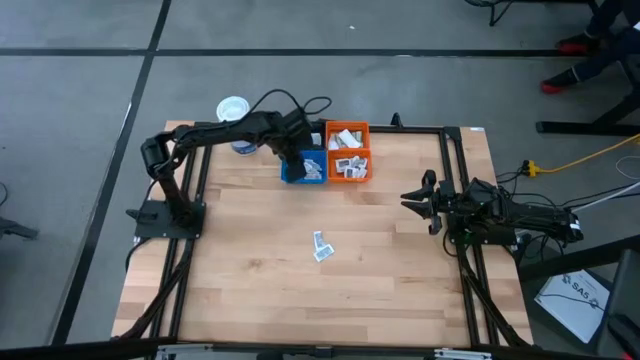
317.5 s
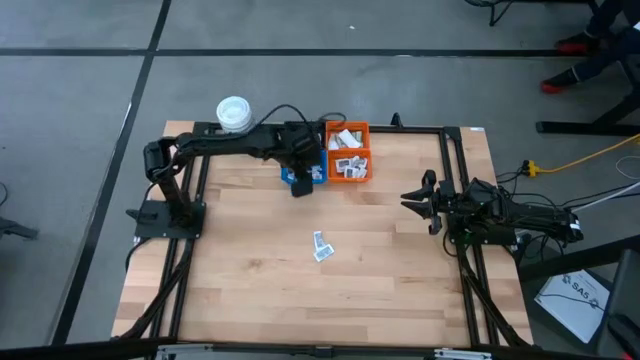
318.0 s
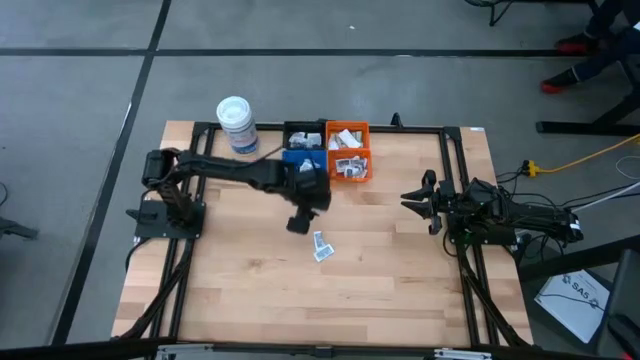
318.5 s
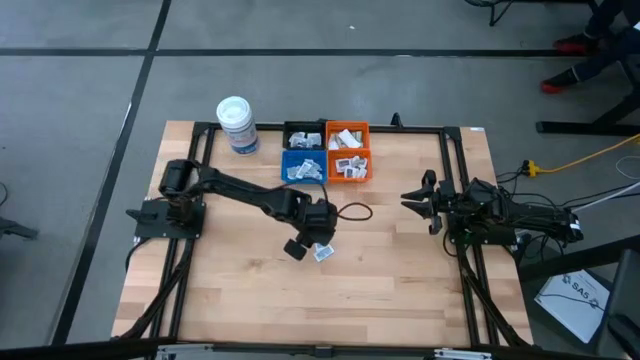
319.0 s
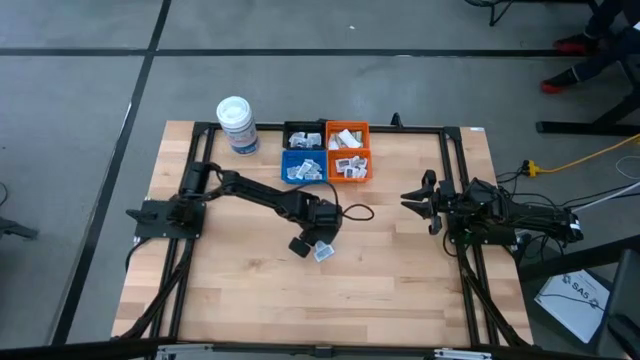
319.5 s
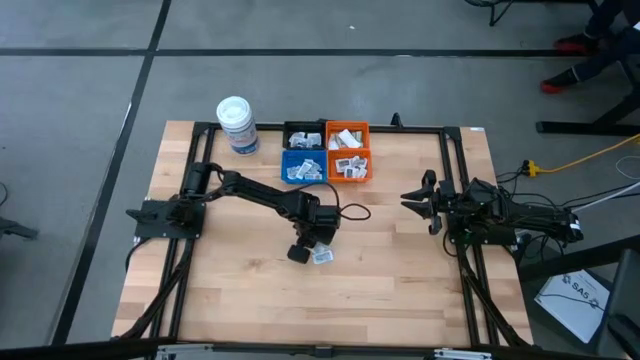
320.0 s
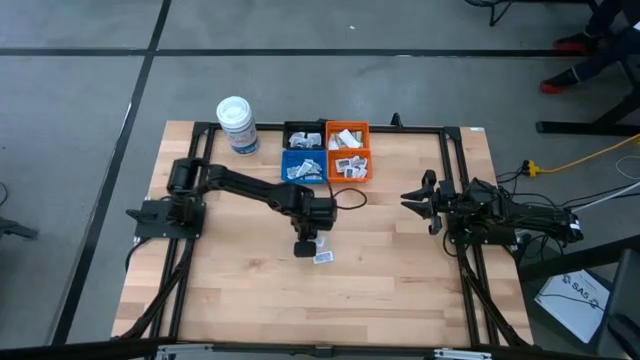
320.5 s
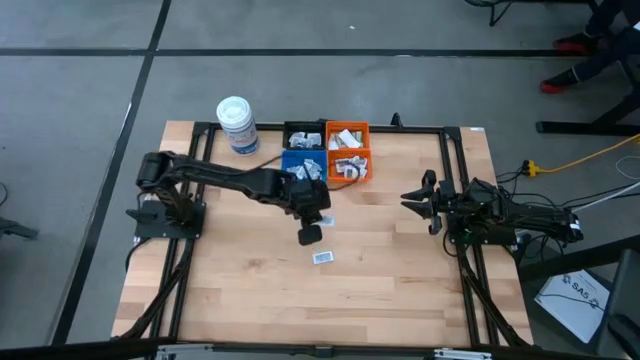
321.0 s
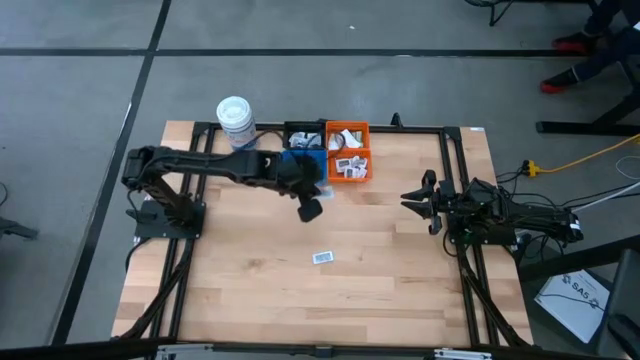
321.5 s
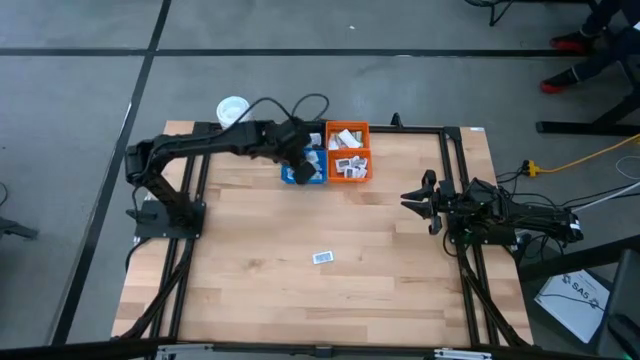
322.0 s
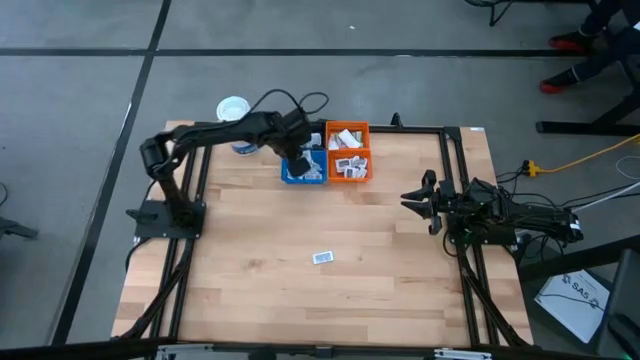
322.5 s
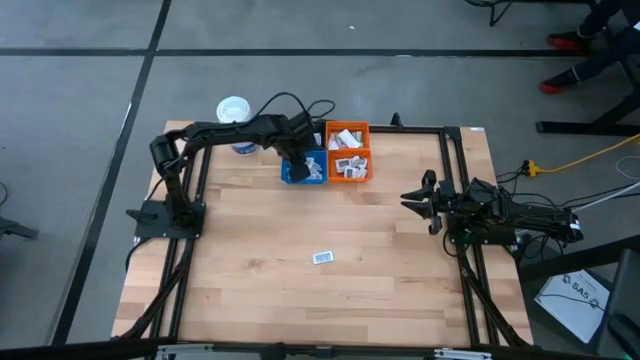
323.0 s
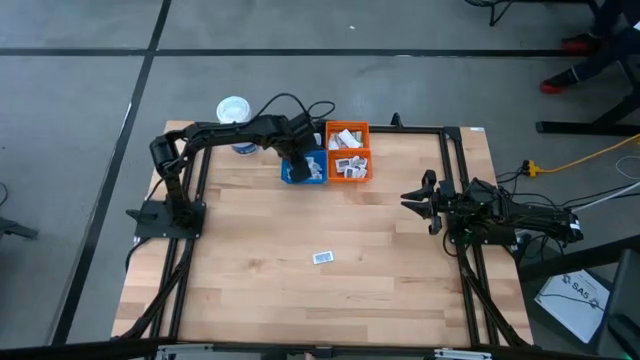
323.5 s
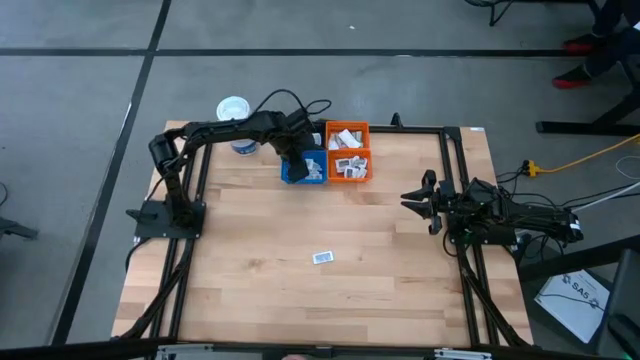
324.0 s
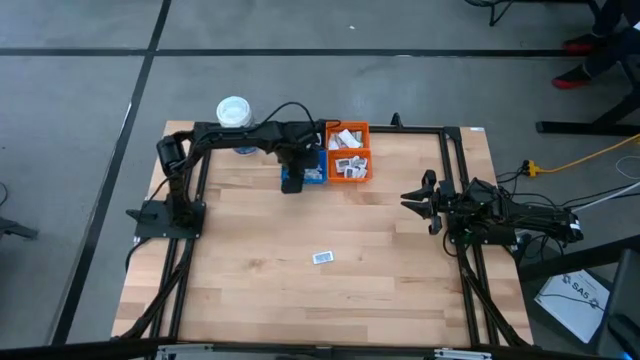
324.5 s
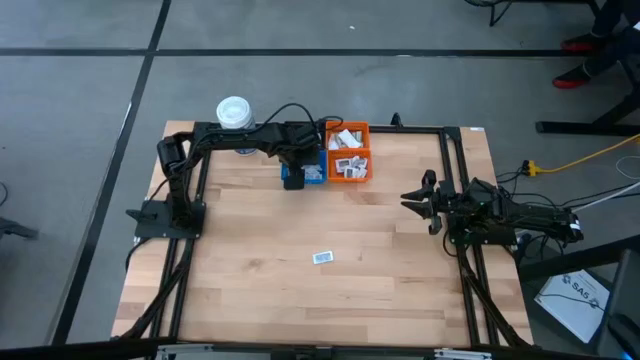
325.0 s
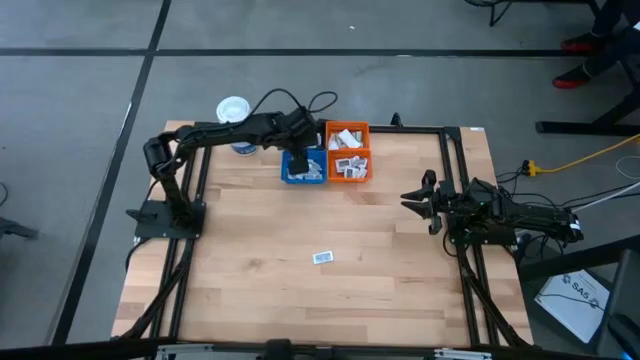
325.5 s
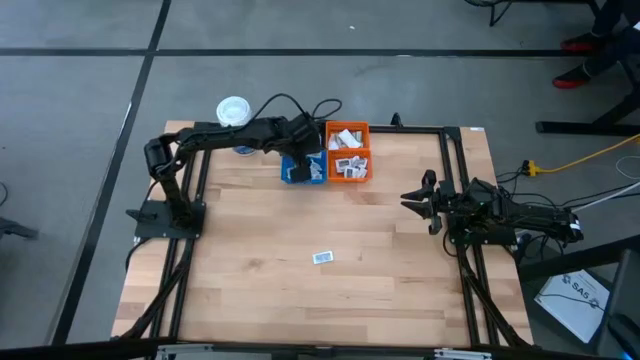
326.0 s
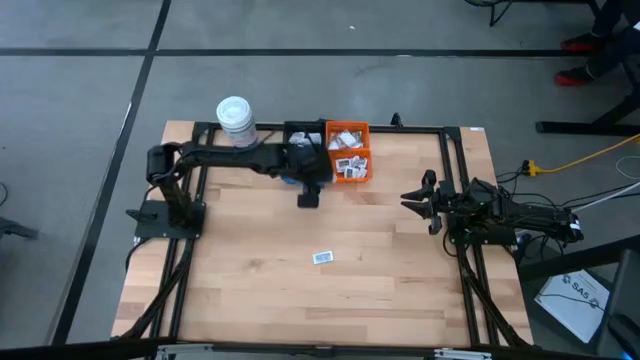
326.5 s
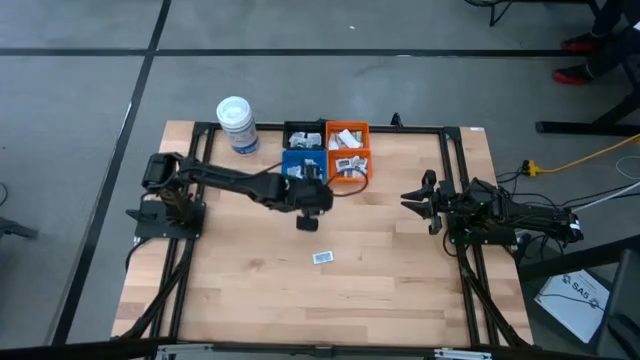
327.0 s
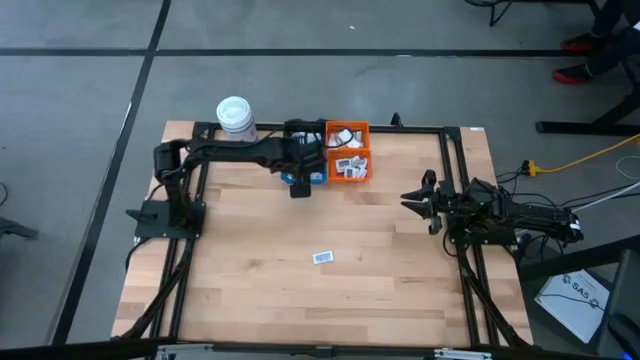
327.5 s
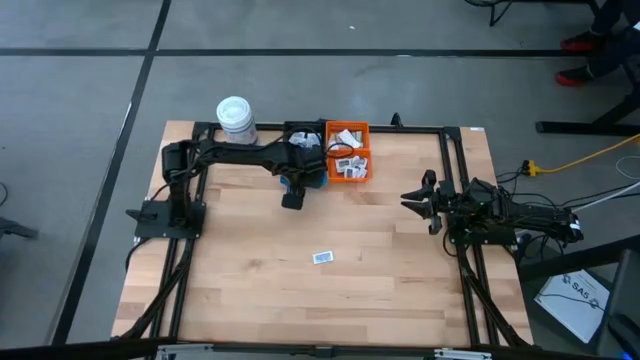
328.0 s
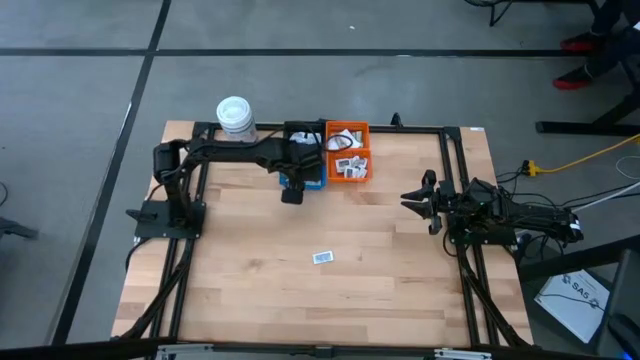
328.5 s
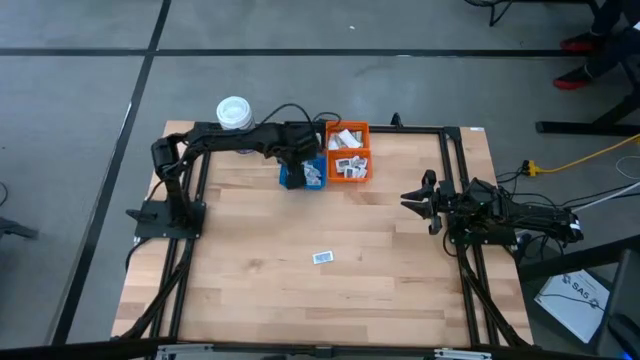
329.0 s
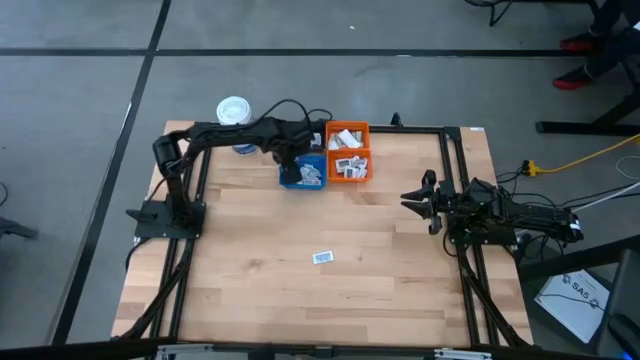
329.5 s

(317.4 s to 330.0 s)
Task: Pick & Place First Aid Supplies
Put the ointment pack into the blue bin

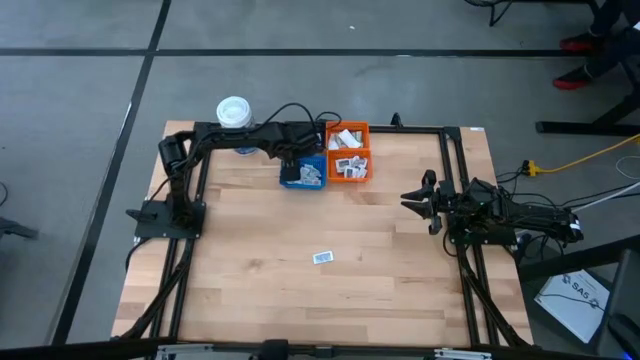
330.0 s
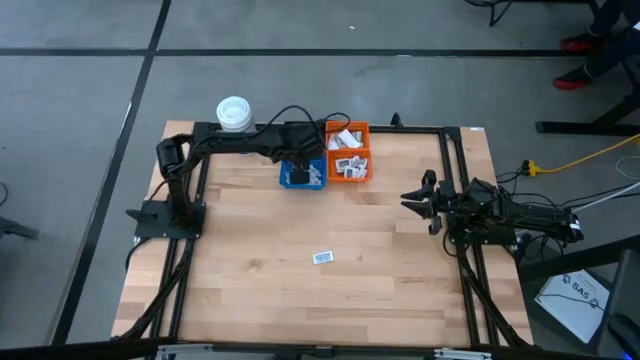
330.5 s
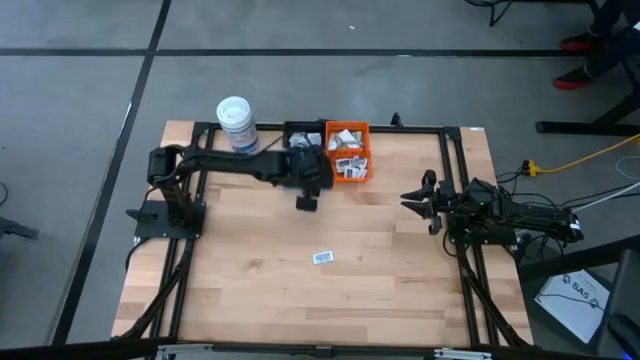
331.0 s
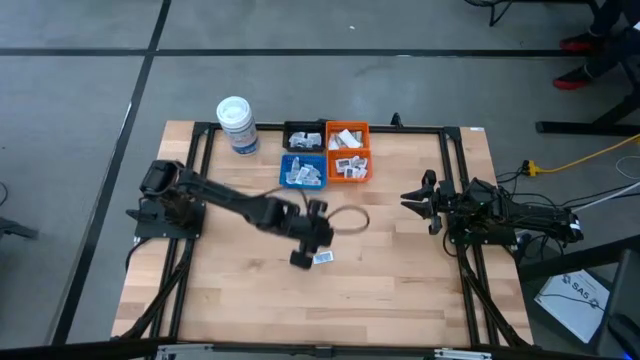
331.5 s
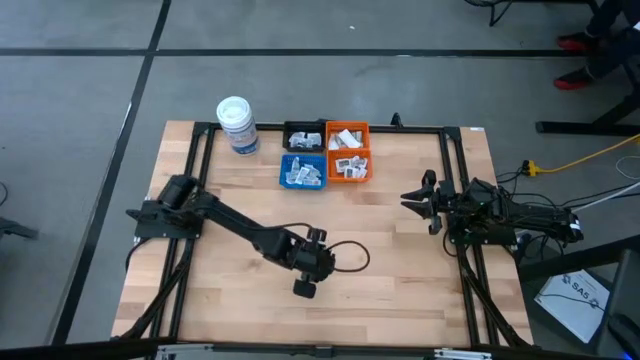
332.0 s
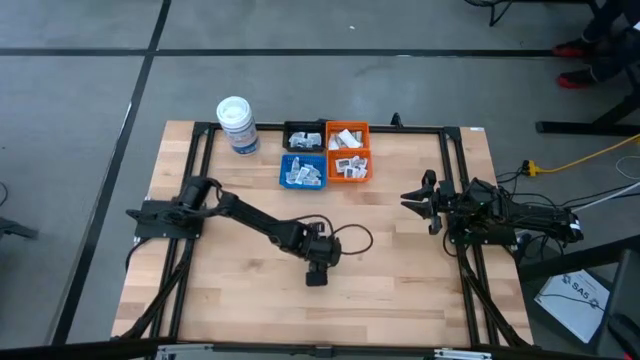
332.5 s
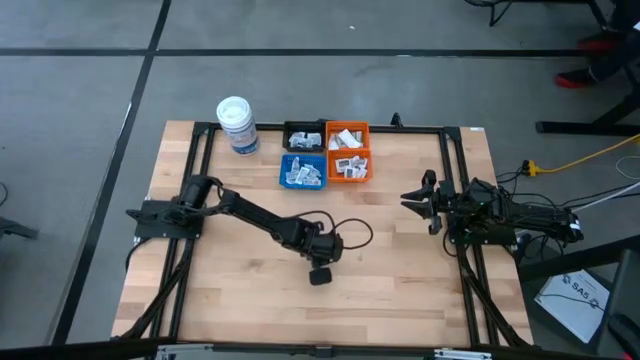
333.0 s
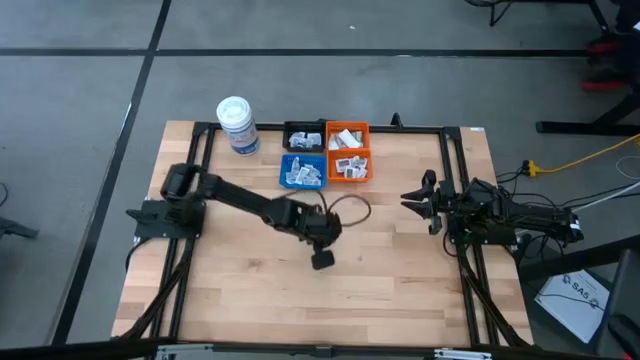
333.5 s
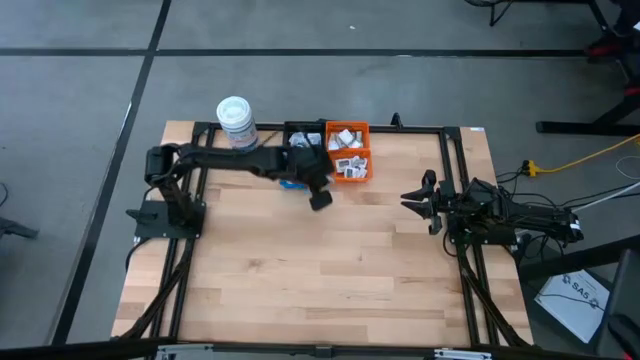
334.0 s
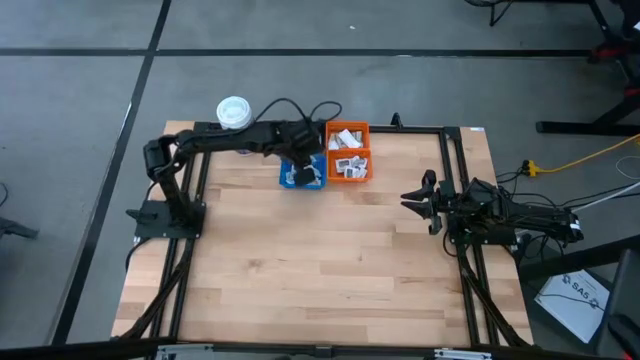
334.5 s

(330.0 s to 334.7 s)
Put the ointment pack into the blue bin

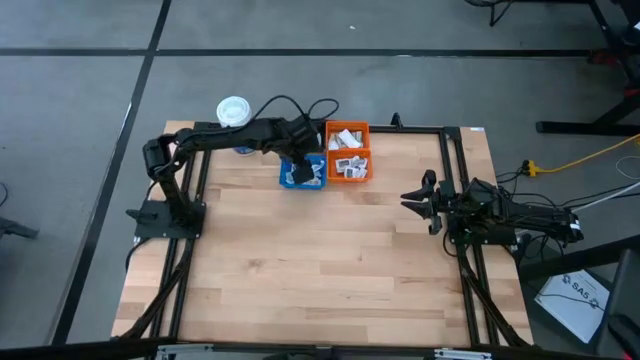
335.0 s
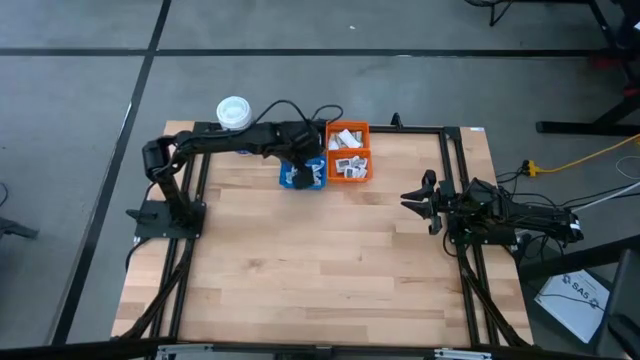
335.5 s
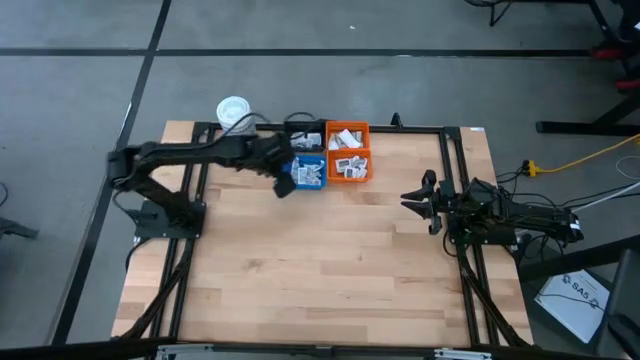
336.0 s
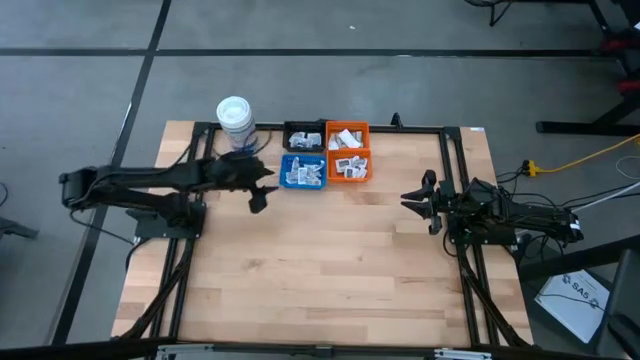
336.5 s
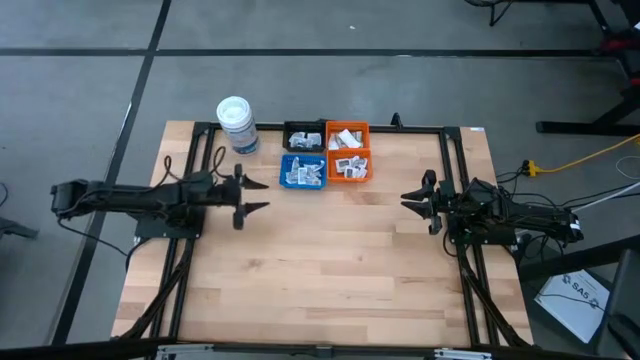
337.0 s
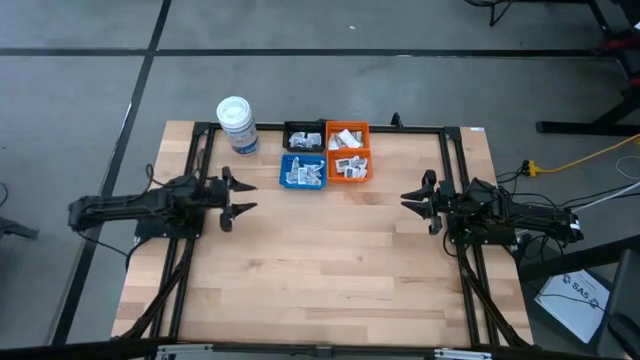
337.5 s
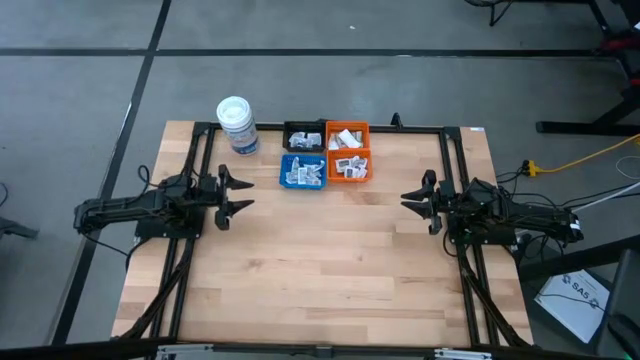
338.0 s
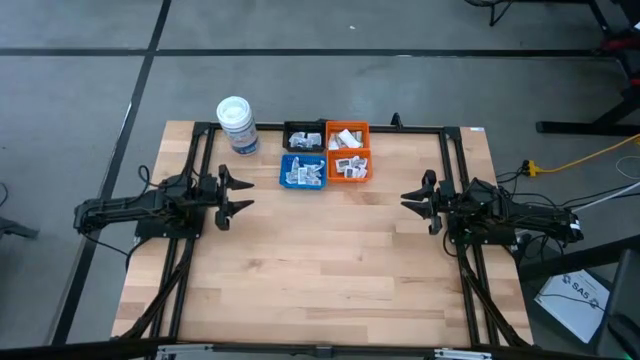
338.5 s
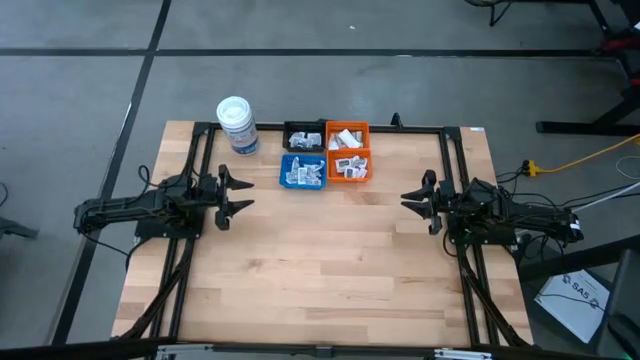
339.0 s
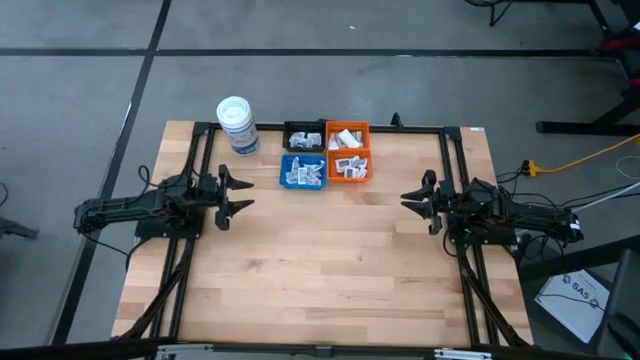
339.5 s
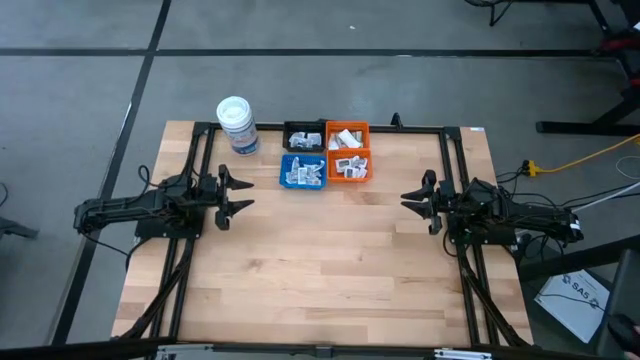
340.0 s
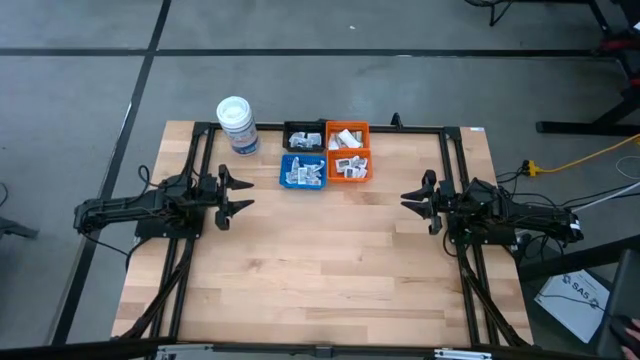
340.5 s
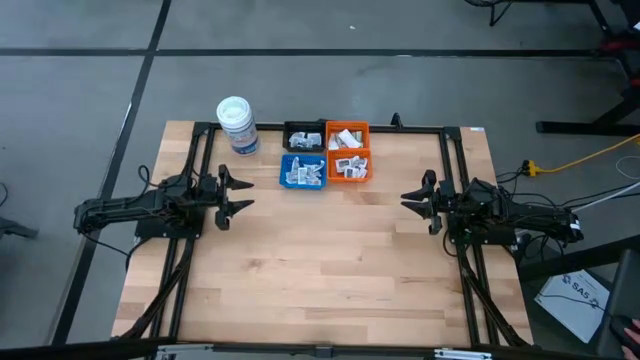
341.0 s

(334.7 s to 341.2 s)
Return to Home Position
